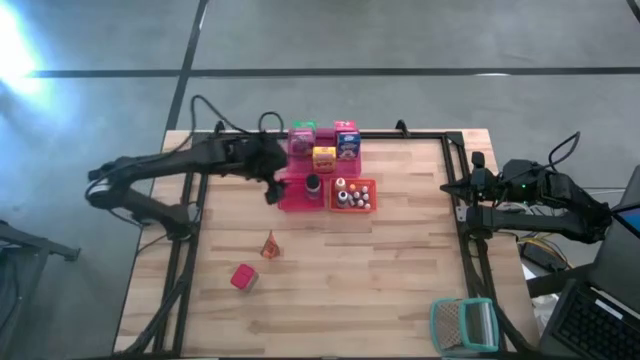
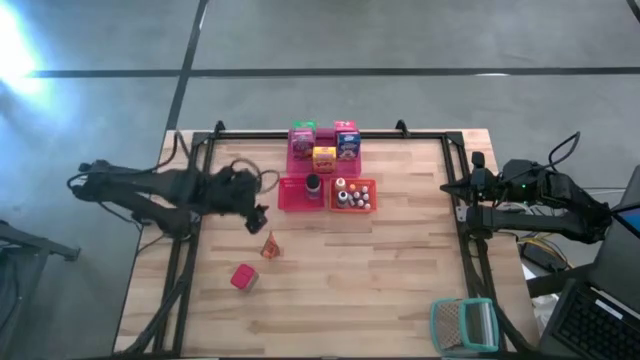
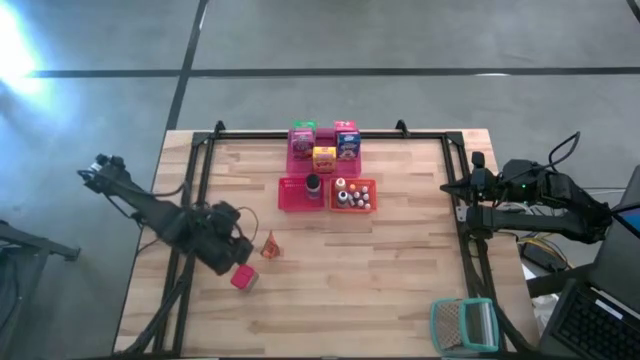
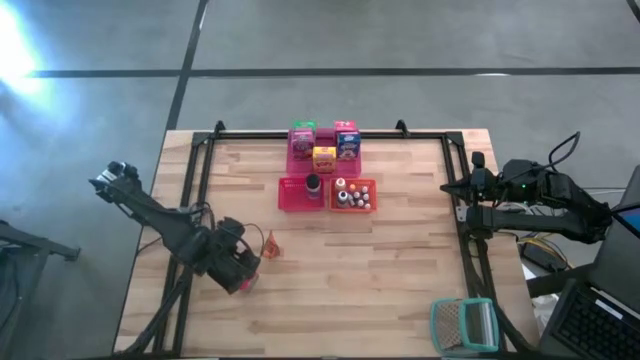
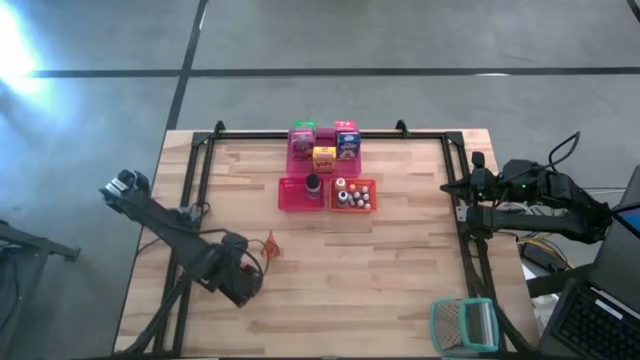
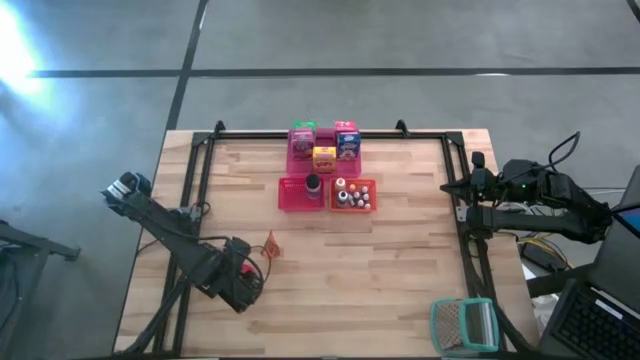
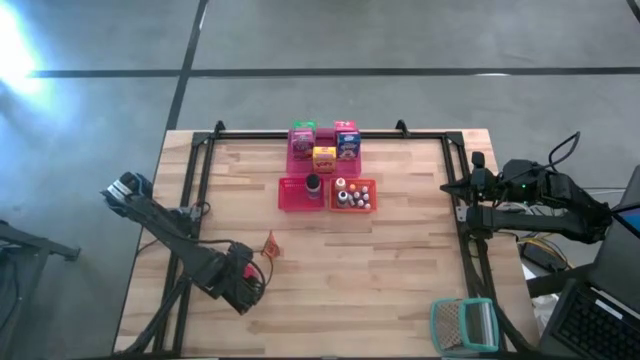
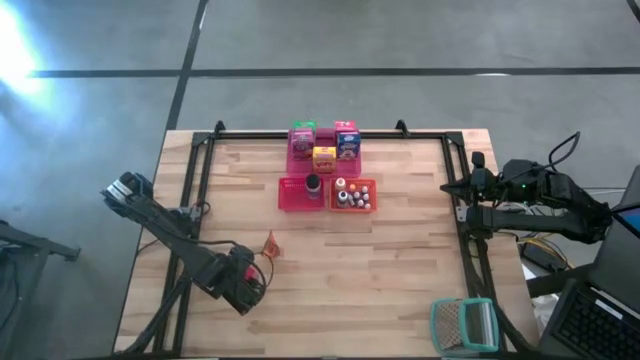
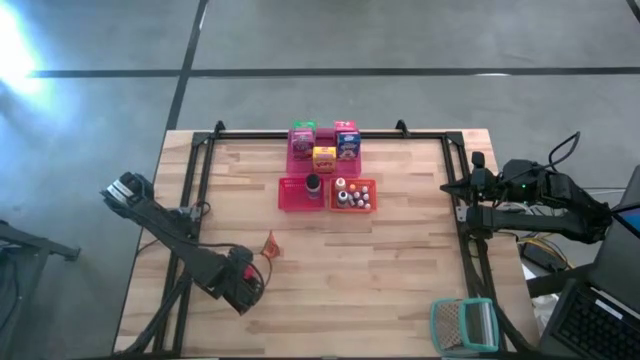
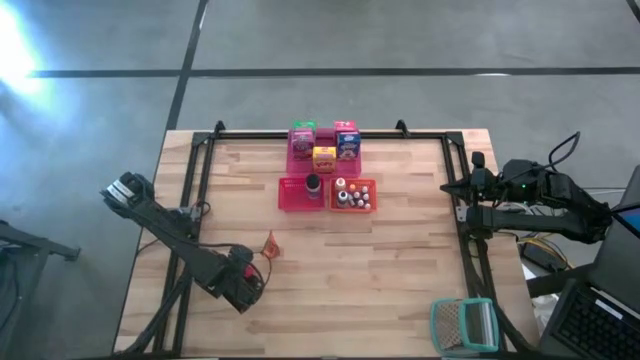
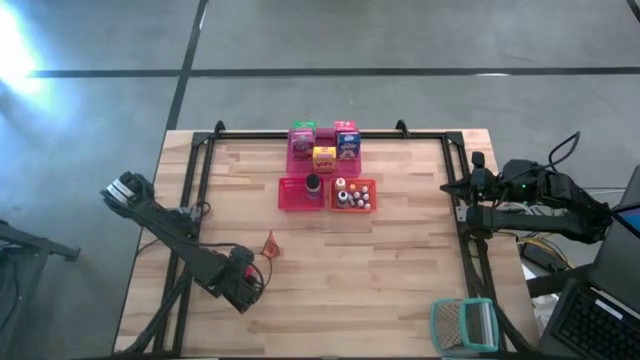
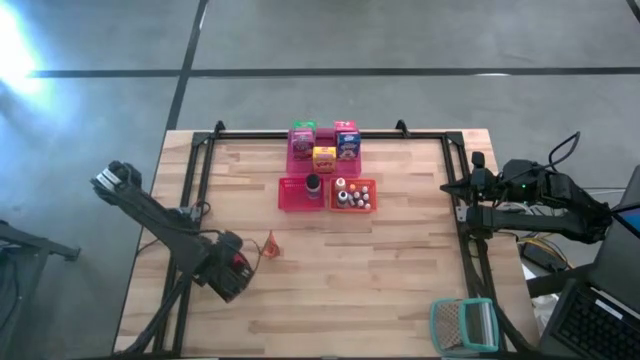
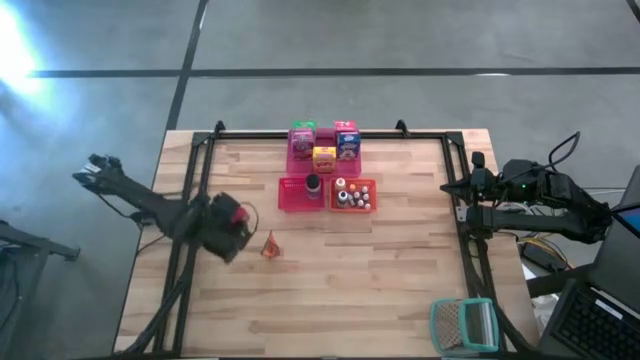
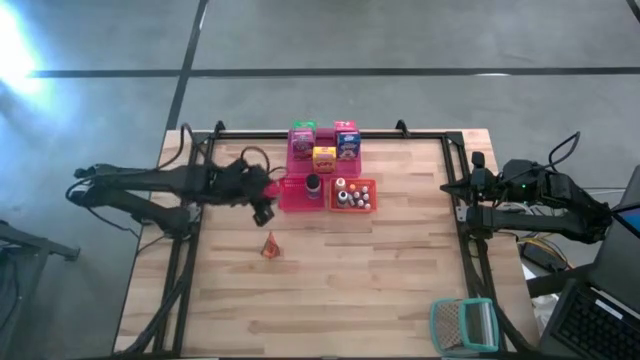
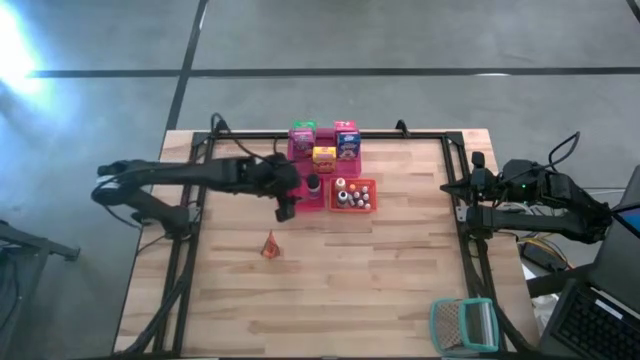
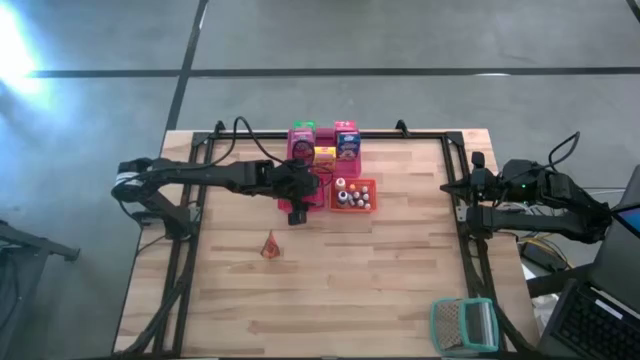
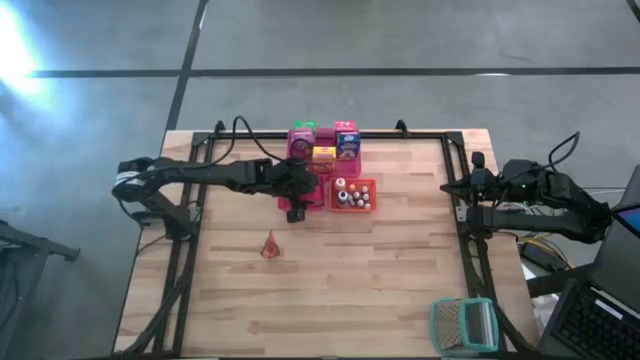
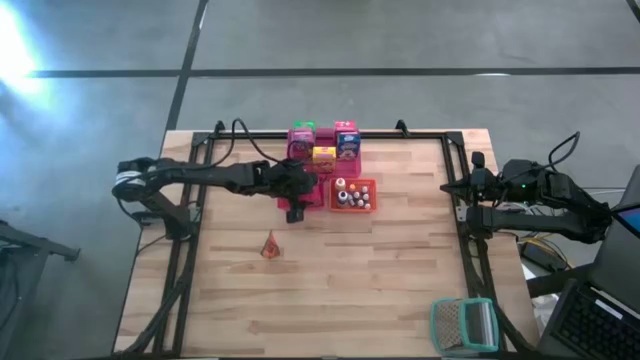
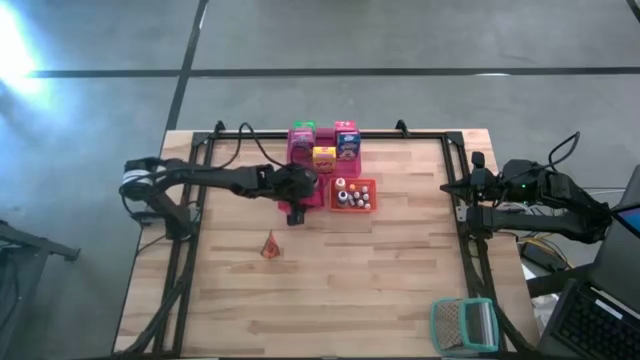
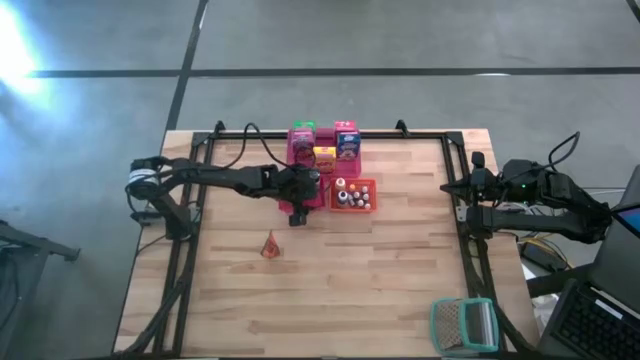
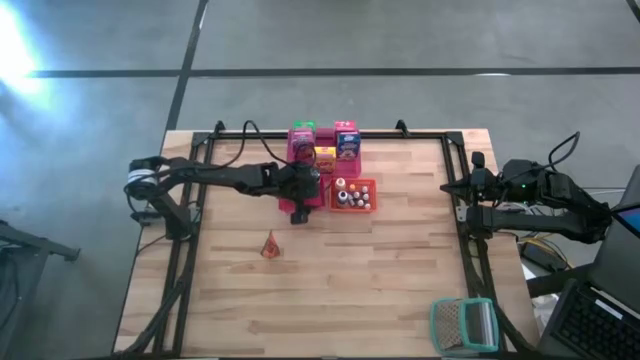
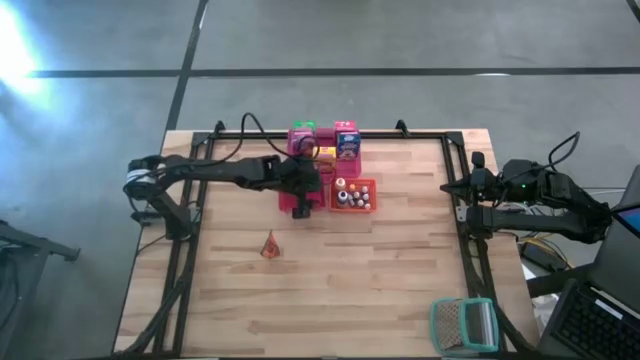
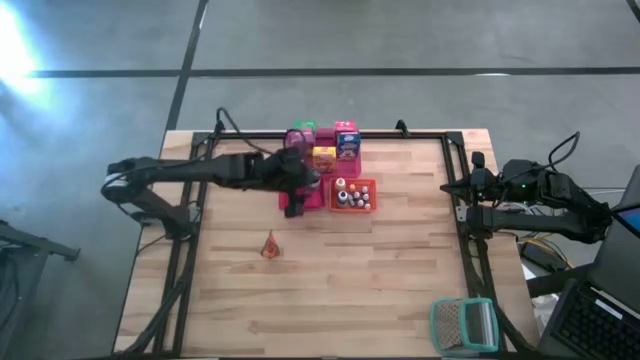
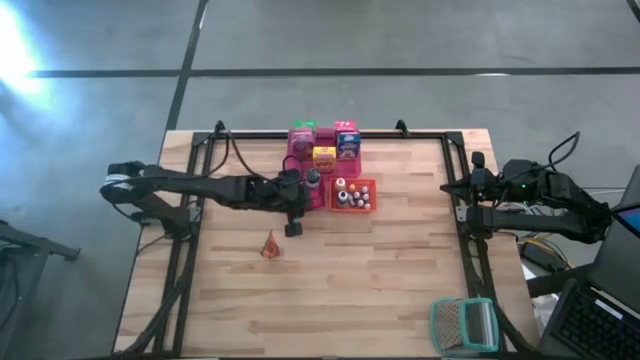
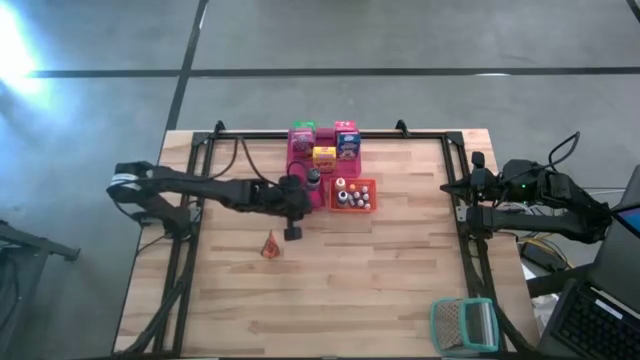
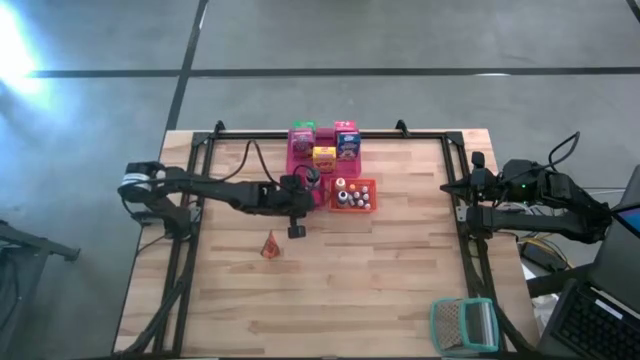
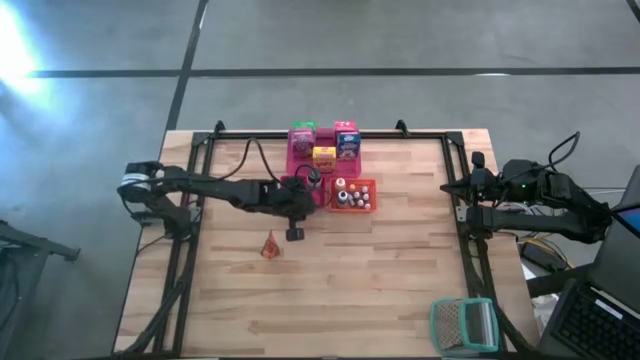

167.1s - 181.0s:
Task: Pick & Place Kitchen Items
Put the red seasoning can into the red bin

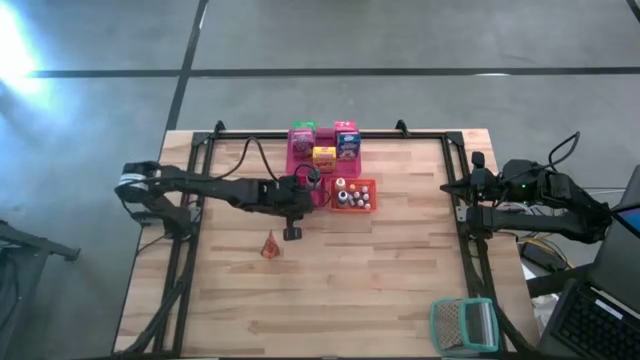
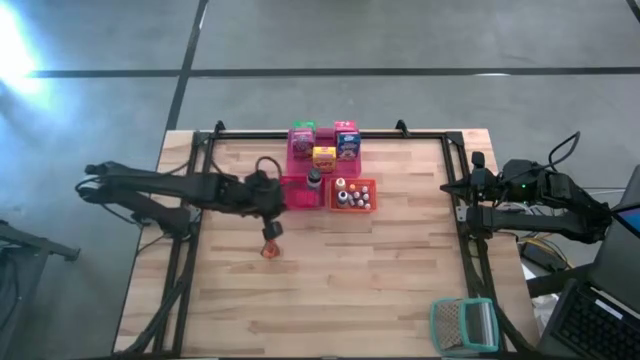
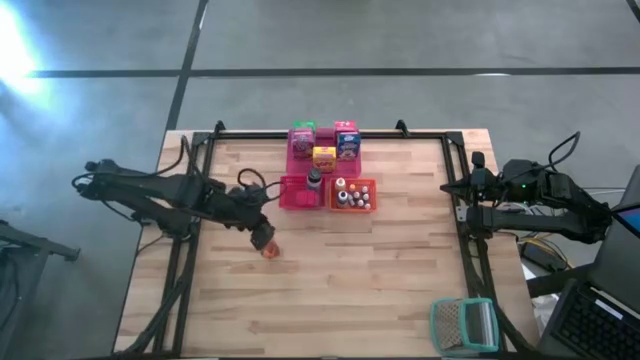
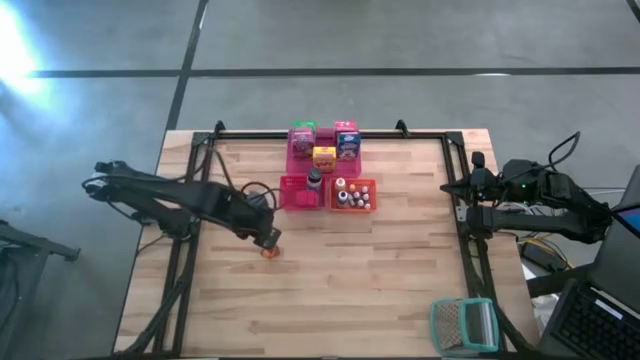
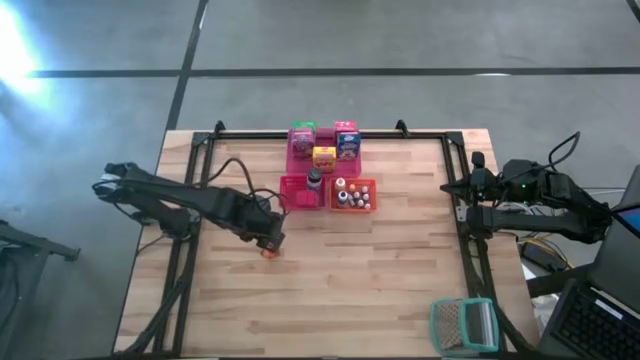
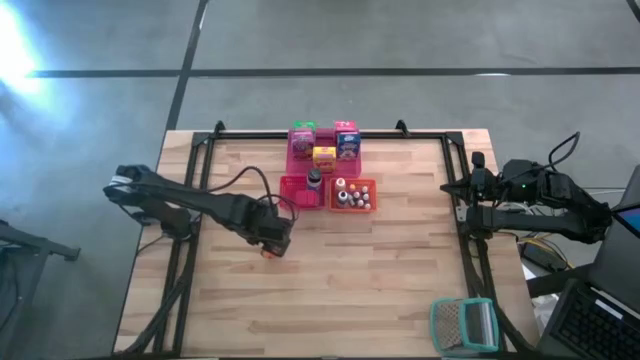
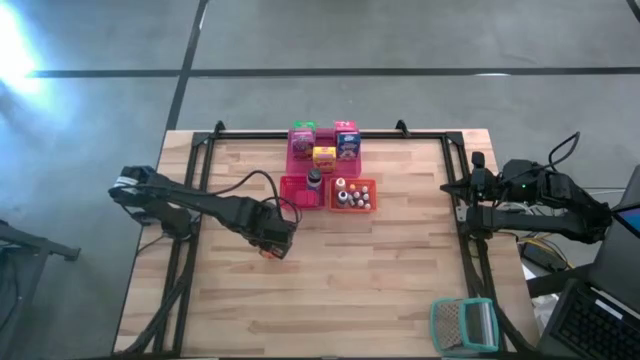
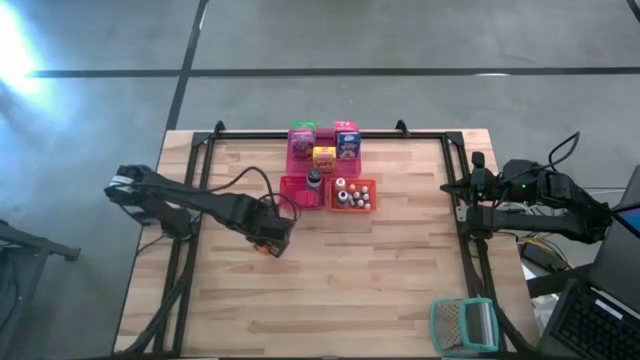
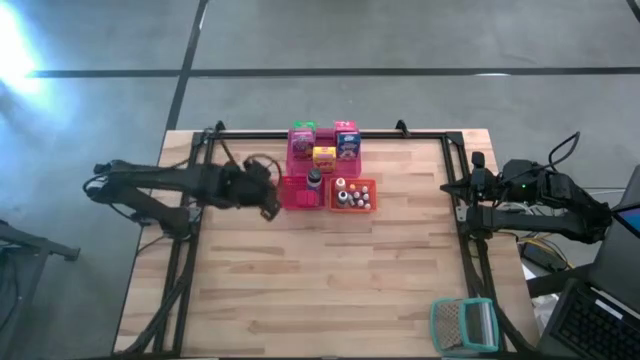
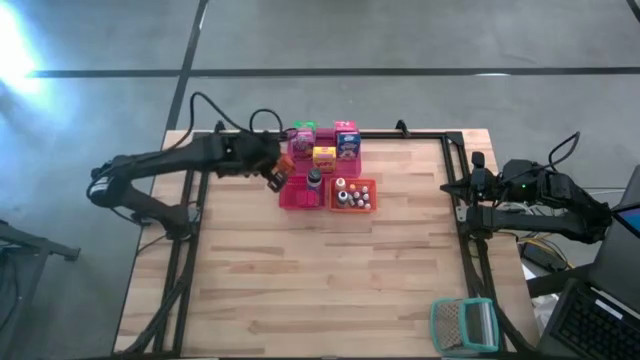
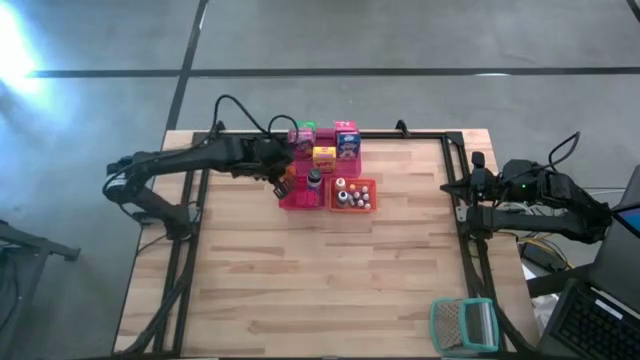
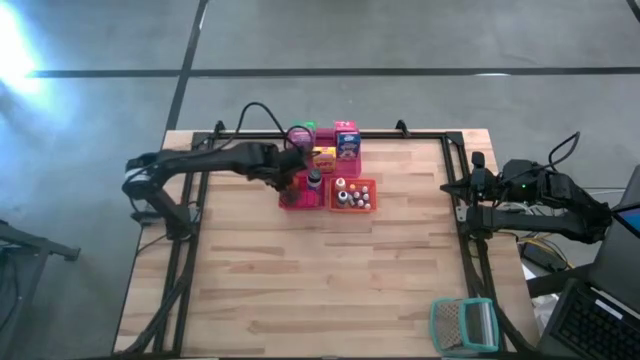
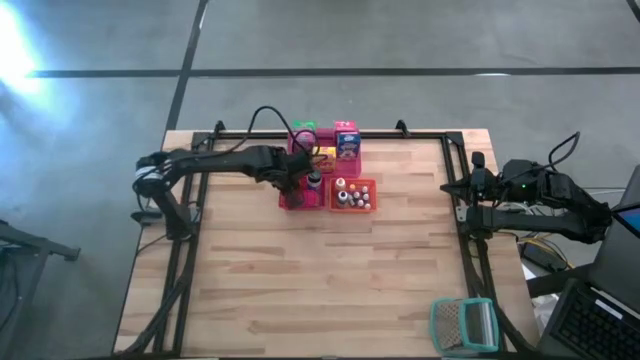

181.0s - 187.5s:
Put the orange seasoning pack into the red bin

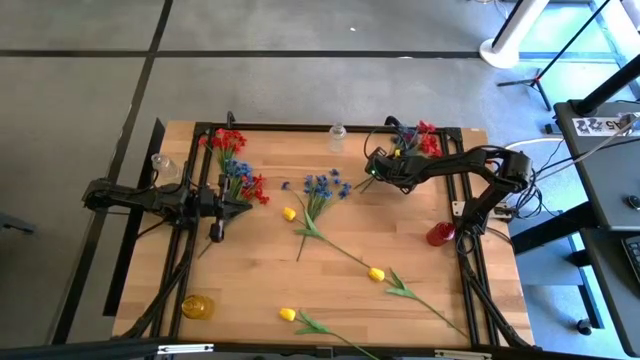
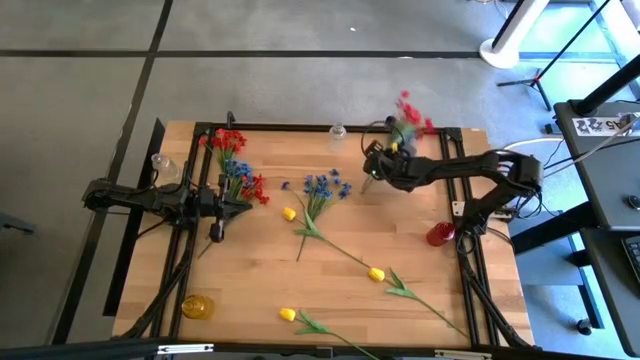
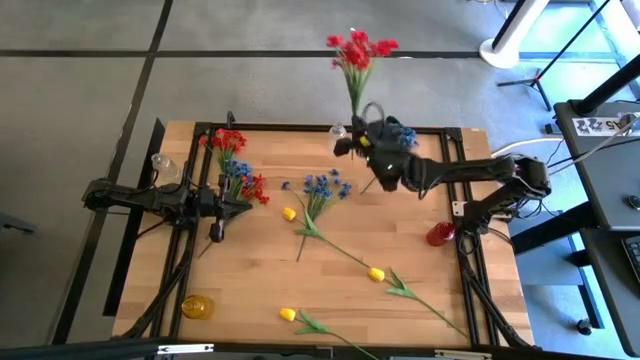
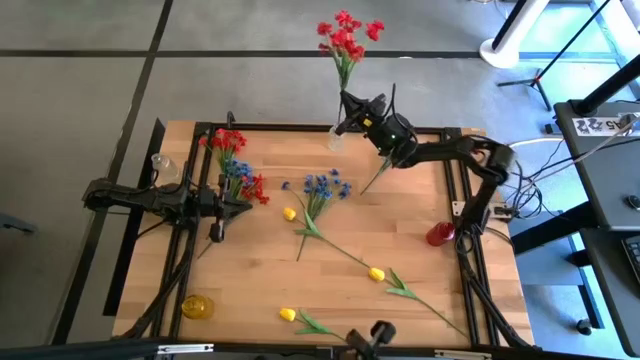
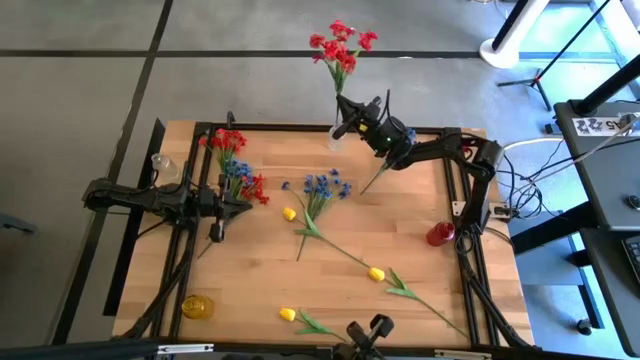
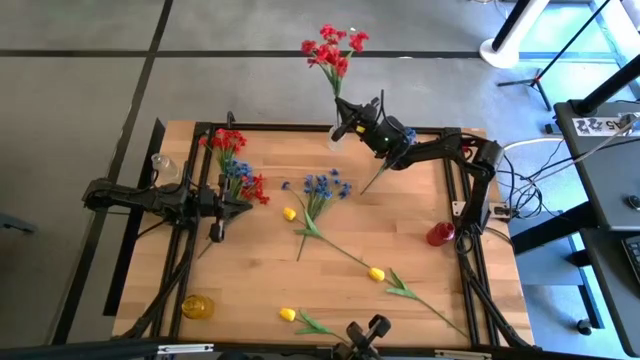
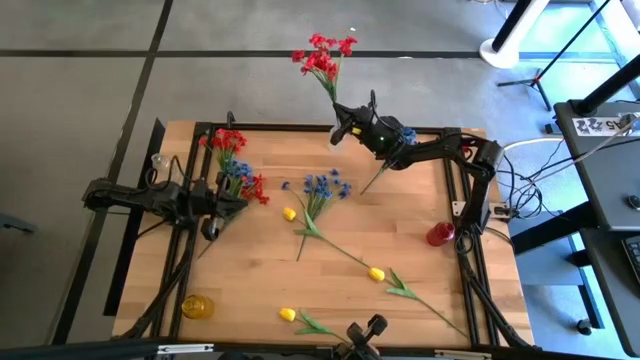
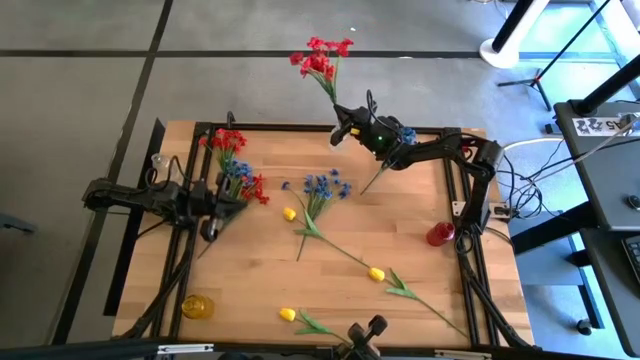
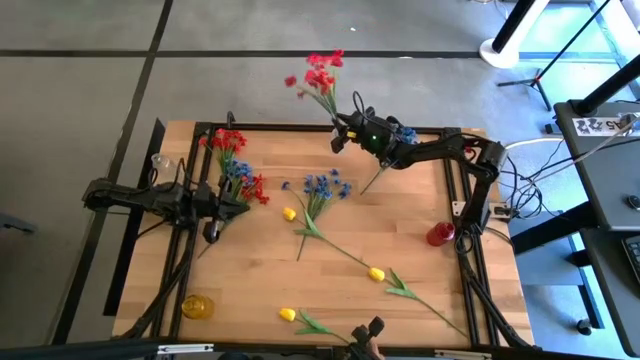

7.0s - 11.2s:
Task: Sort flowers into vase by color
Put the top right red flower into the transparent vase
